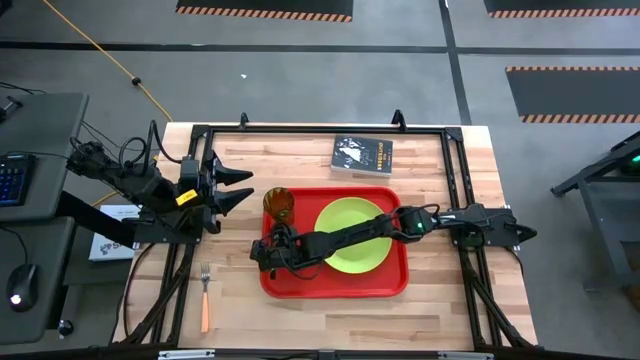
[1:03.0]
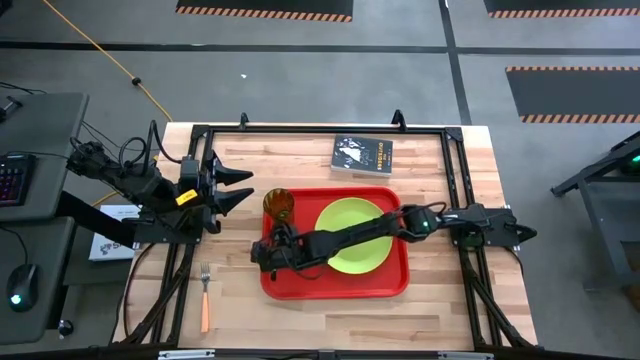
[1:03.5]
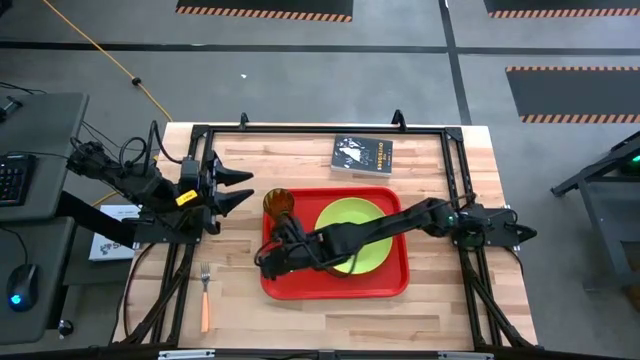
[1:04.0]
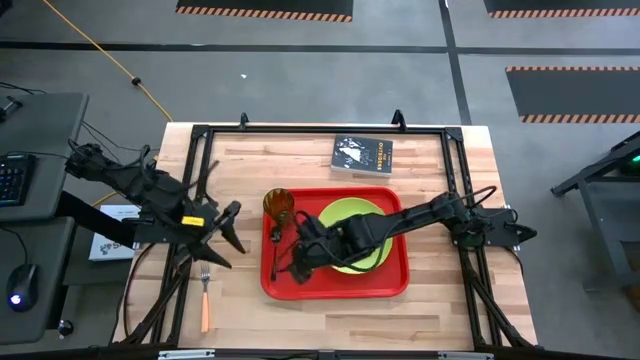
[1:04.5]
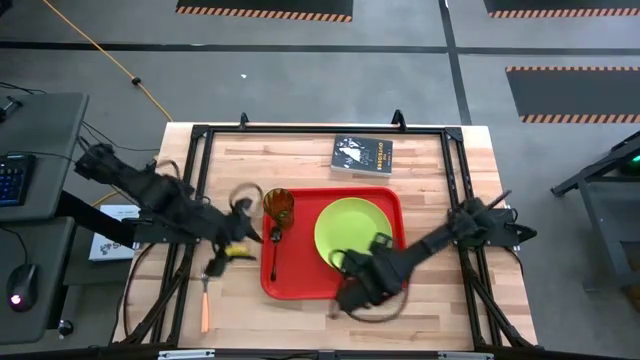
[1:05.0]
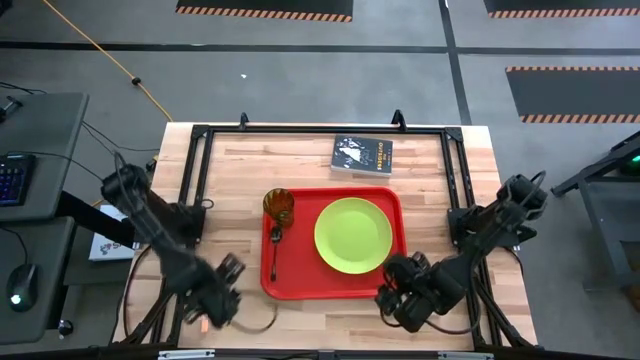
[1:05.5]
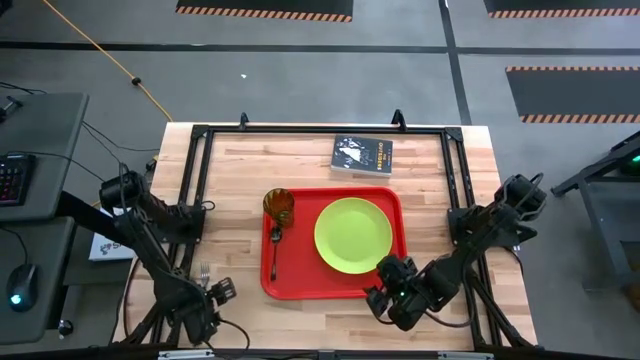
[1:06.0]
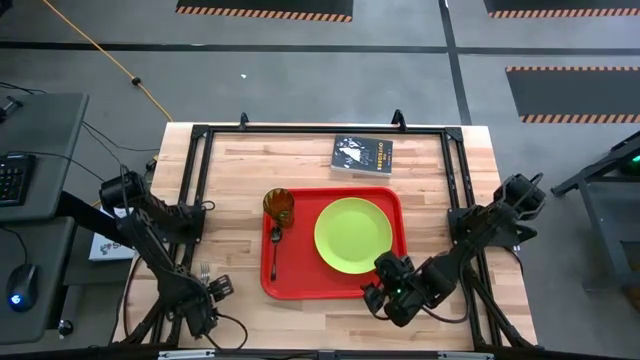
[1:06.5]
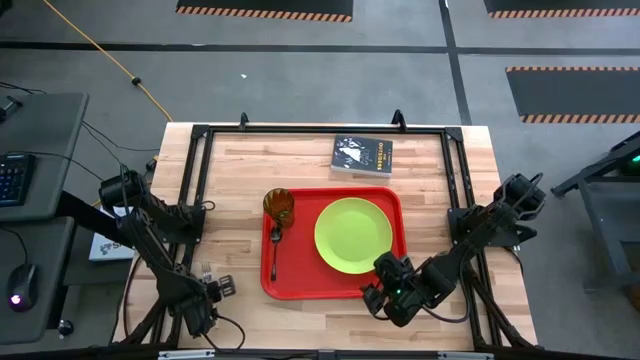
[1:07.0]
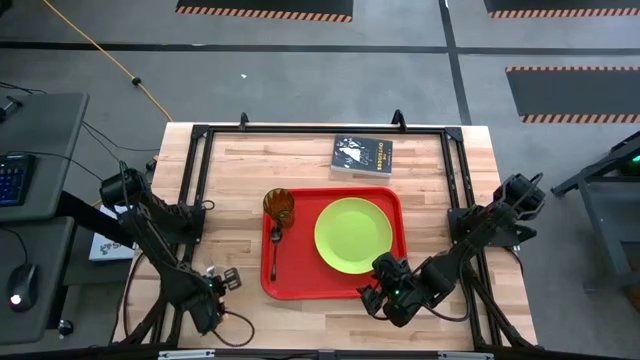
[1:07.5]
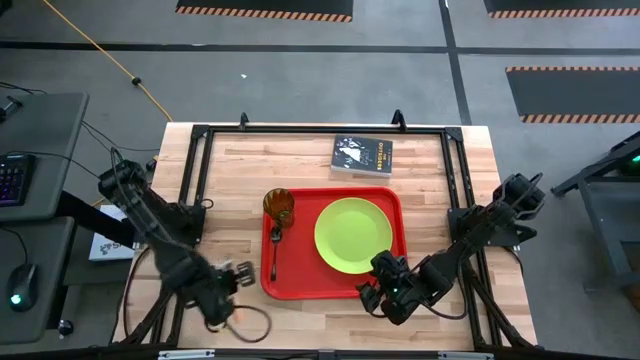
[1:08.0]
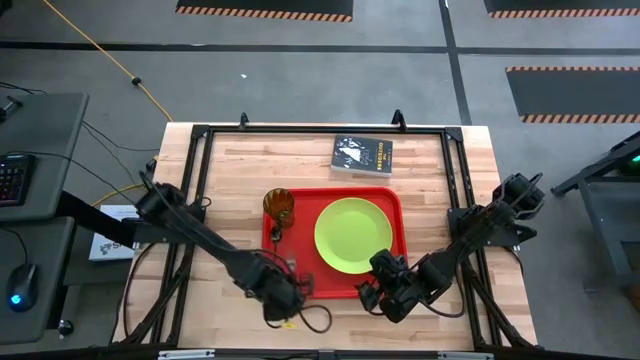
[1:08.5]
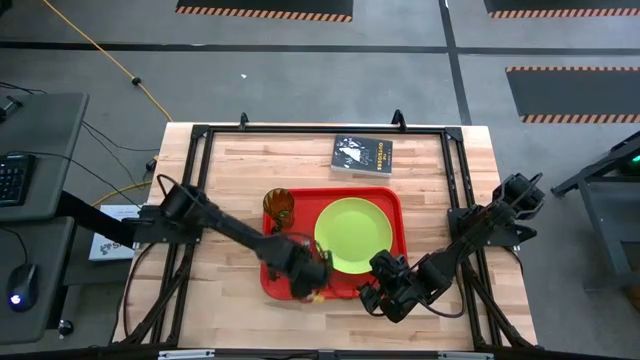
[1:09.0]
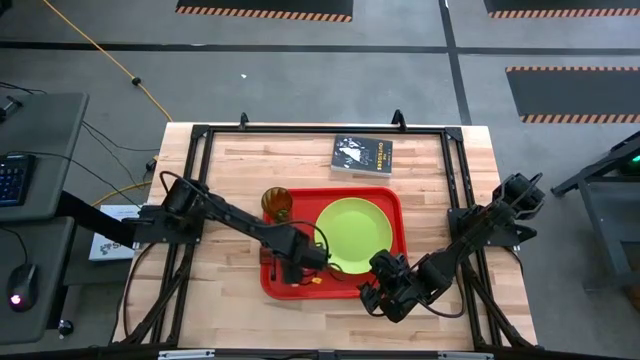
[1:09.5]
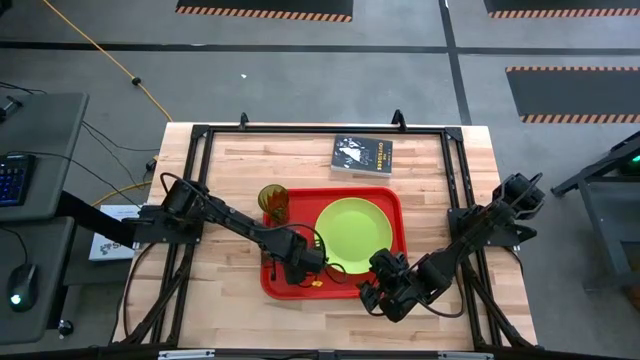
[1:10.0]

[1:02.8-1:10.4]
Task: Pick and place plate/cup/fork/spoon on tray
Put the light orange fork on the red tray to the right of the black spoon

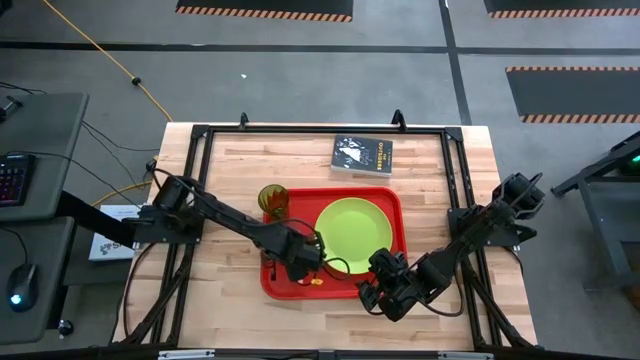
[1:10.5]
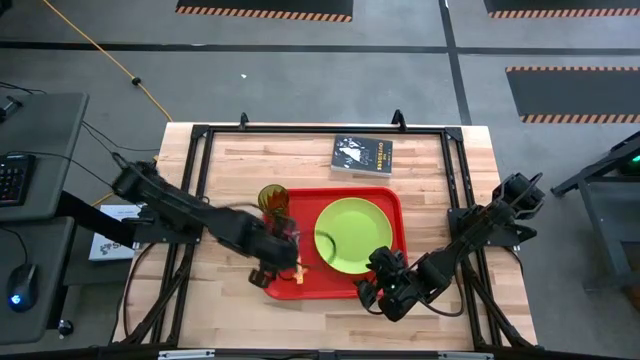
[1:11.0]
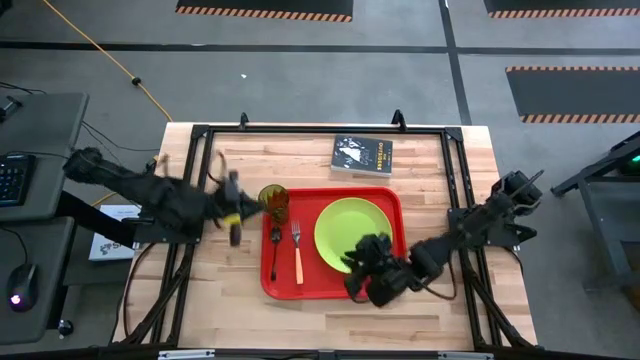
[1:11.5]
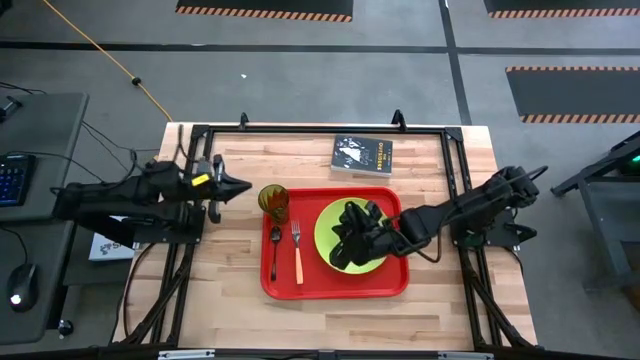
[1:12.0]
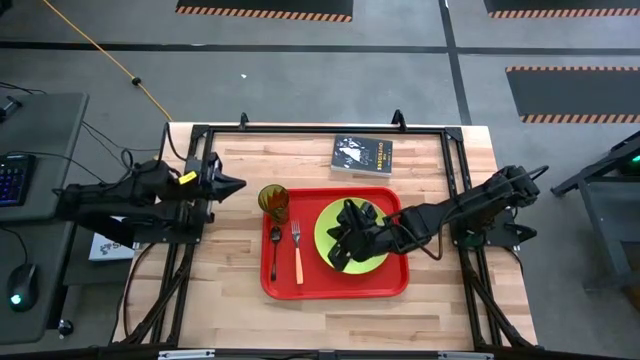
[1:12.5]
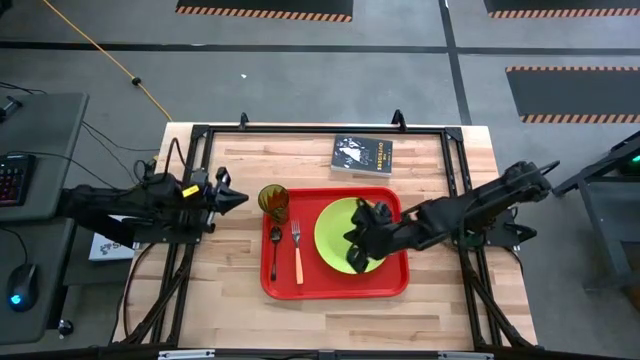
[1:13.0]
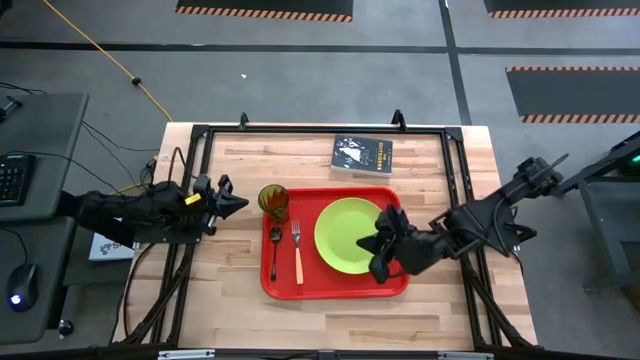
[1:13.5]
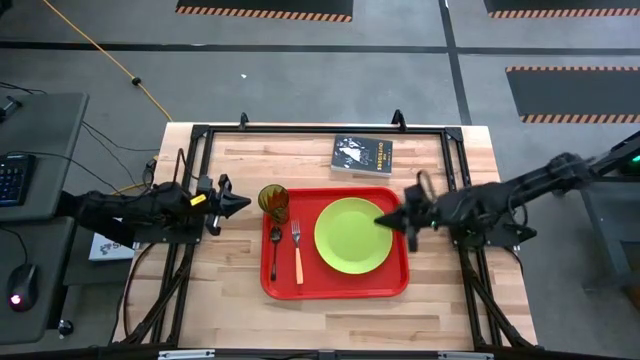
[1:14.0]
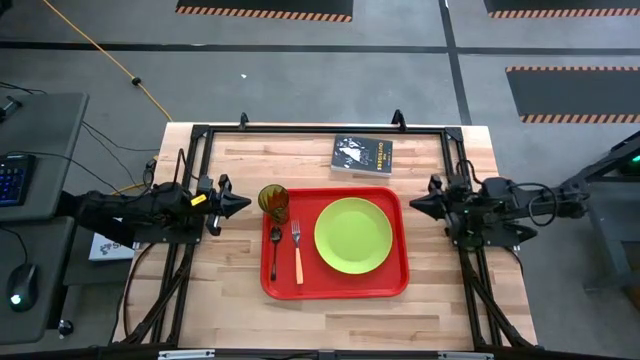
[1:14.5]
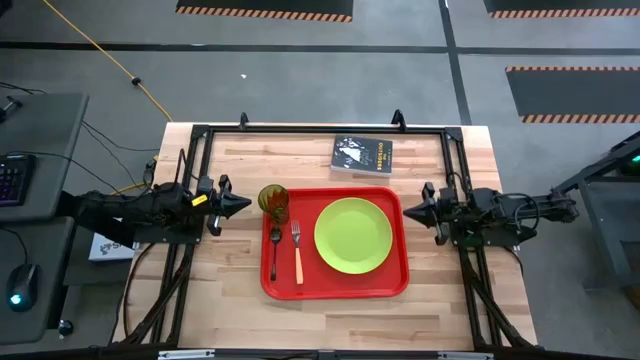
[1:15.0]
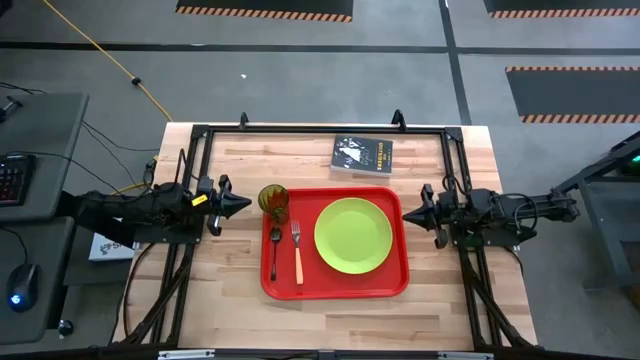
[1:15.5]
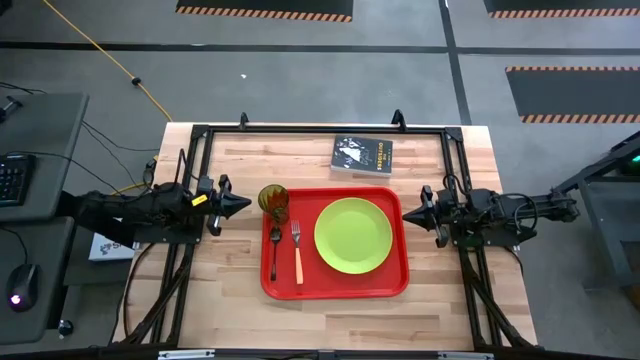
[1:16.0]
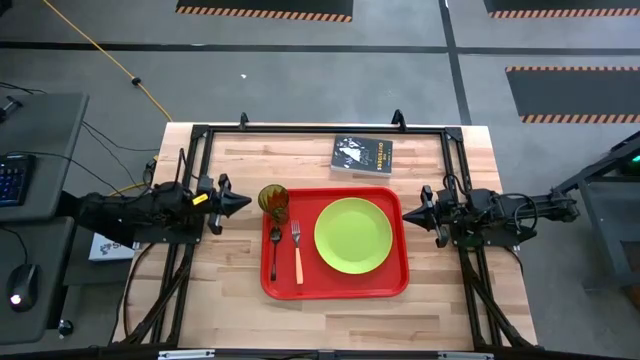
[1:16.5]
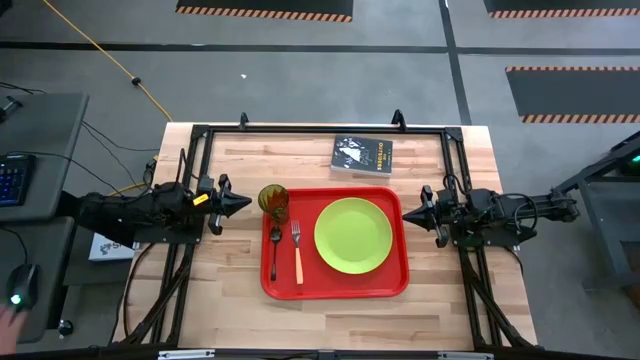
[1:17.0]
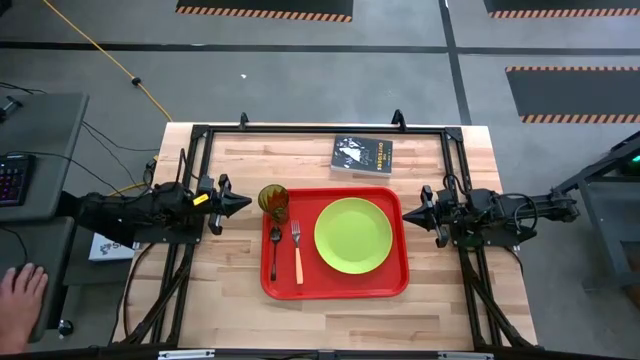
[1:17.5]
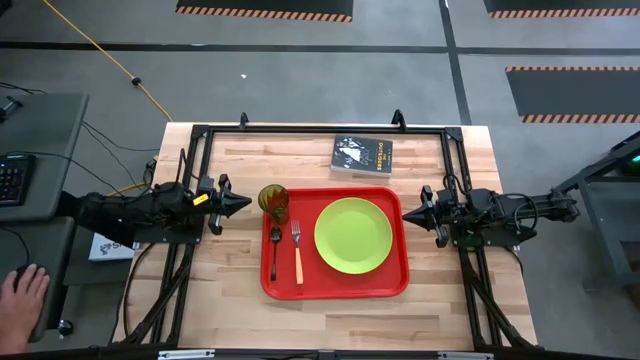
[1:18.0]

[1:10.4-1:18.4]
Return to Home Position

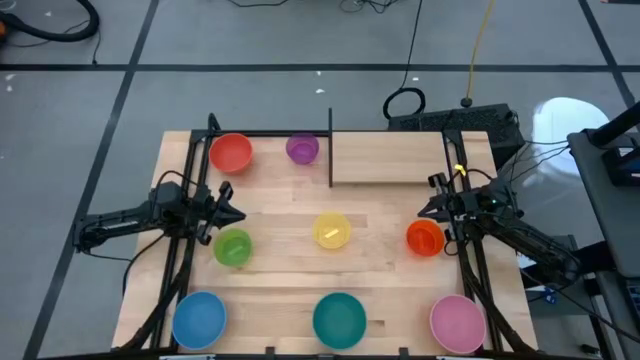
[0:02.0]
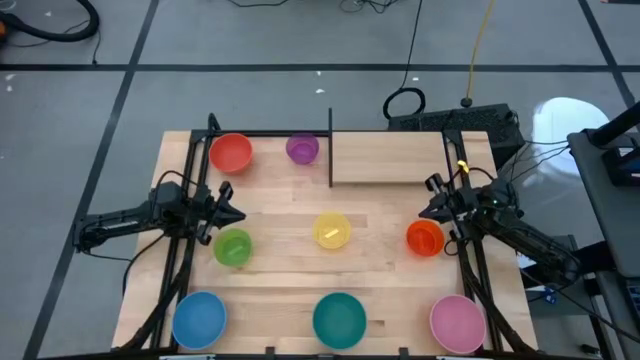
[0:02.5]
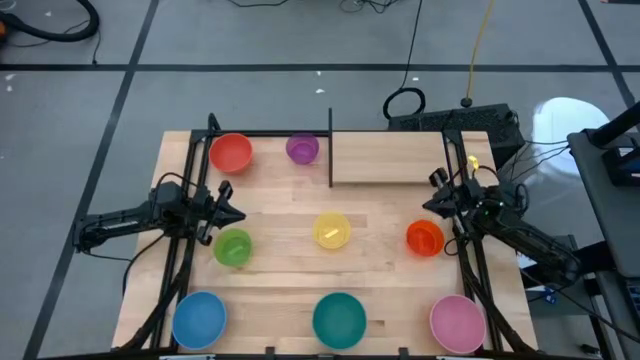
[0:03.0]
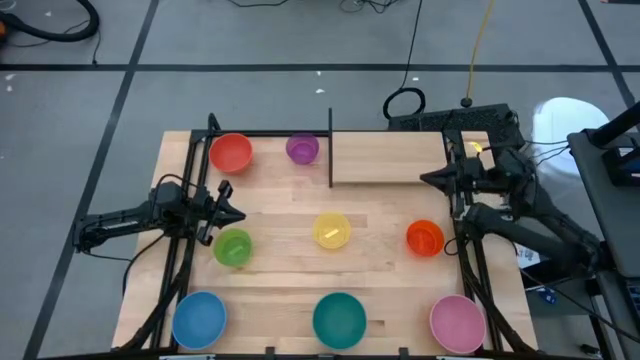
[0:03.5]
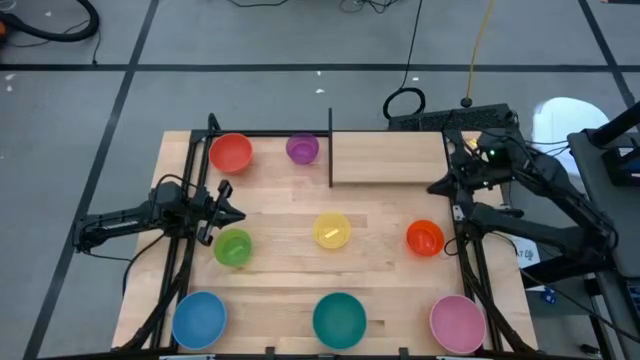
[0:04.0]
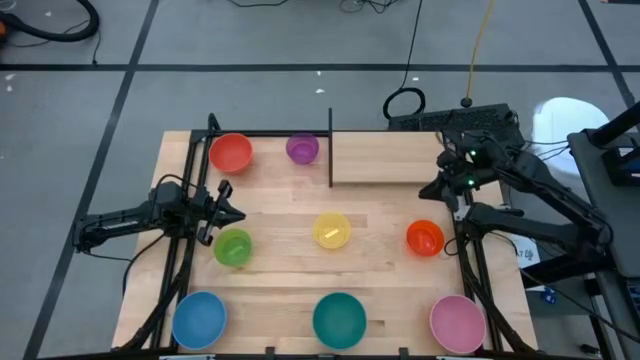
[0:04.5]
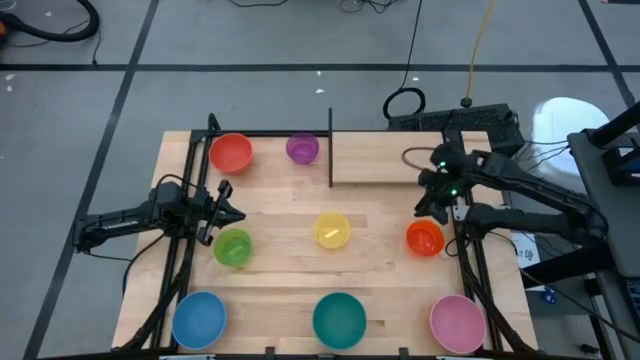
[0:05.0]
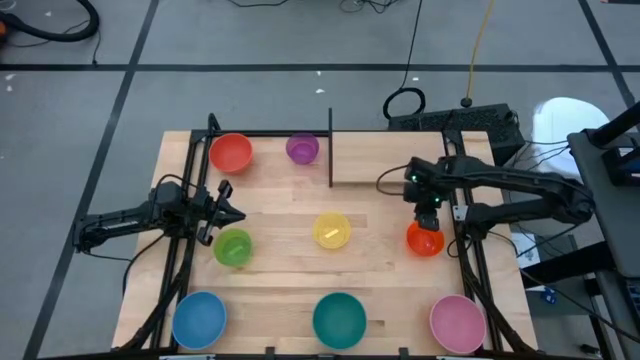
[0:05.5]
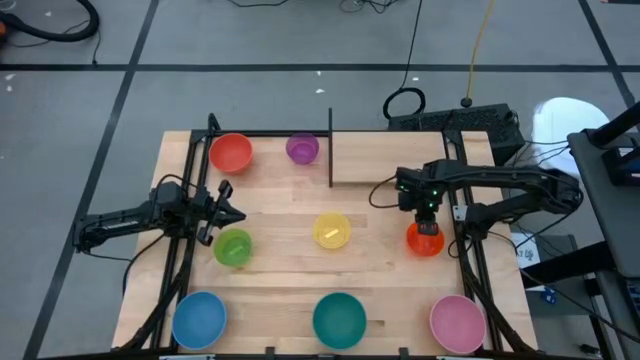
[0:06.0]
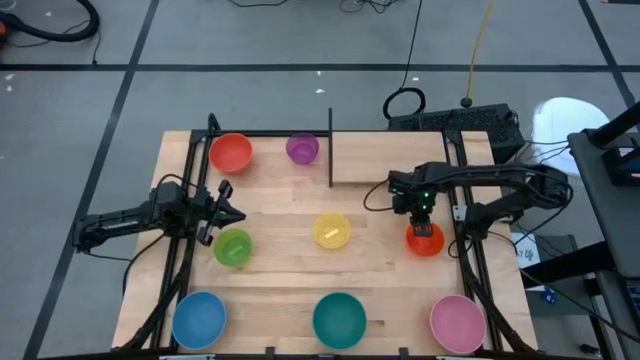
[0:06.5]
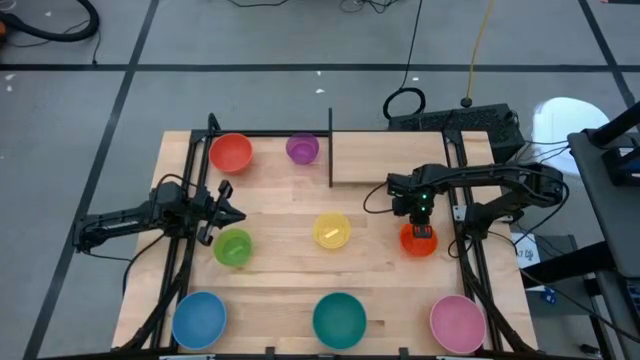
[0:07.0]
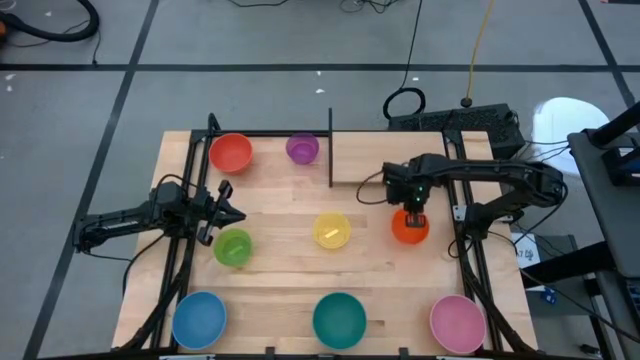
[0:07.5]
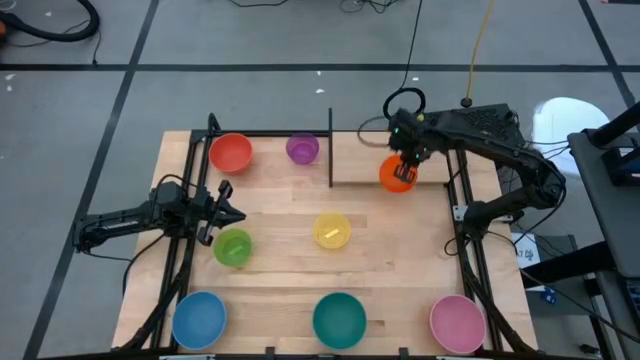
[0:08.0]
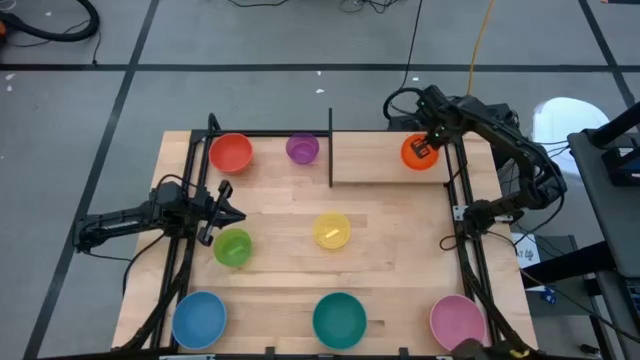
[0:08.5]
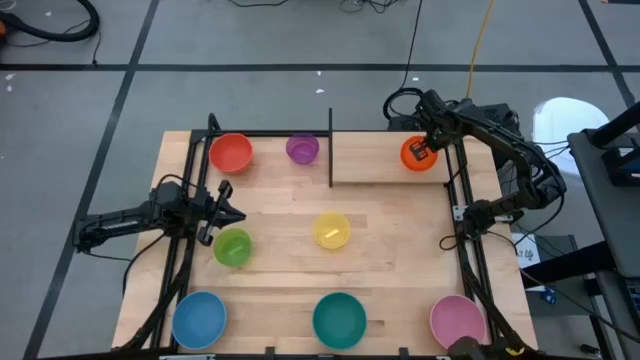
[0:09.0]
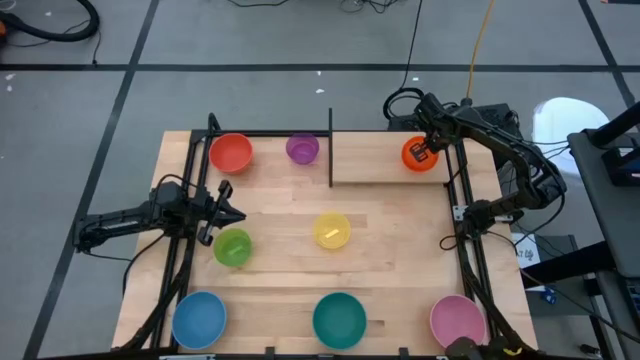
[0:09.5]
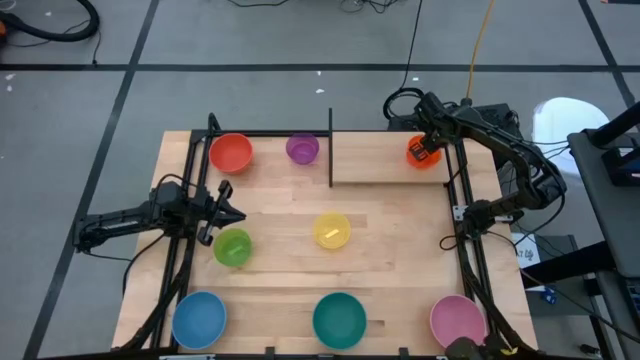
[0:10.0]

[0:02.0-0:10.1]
Task: Place and stack bowls onto a shelf
Put the small orange bowl on the shelf
